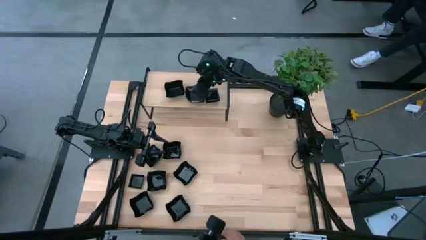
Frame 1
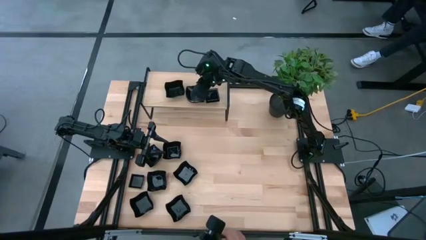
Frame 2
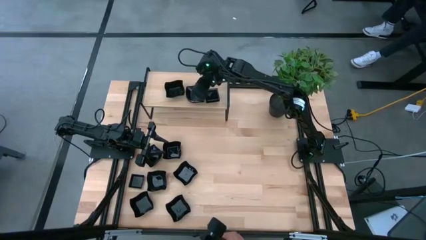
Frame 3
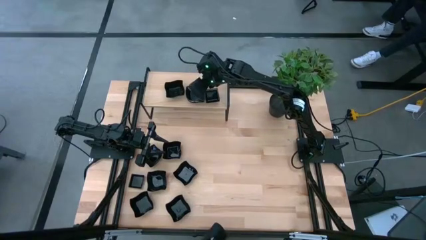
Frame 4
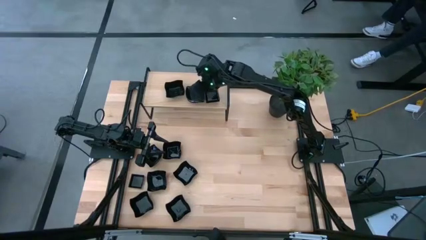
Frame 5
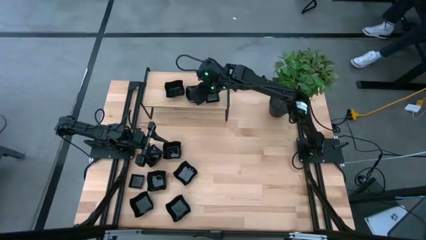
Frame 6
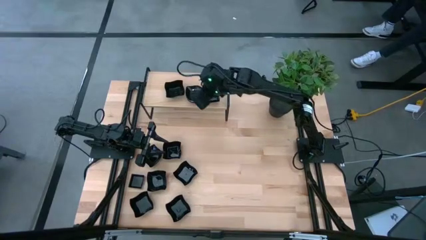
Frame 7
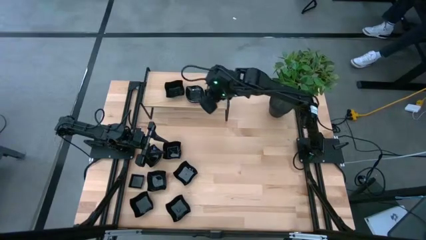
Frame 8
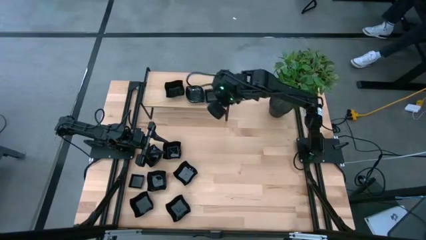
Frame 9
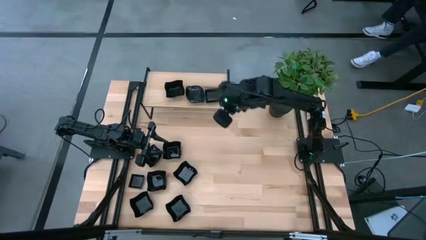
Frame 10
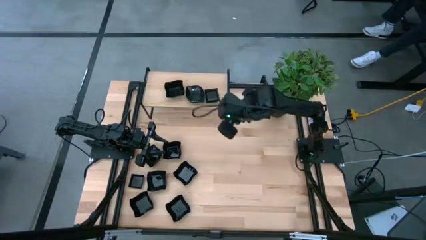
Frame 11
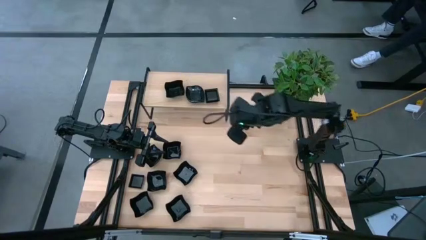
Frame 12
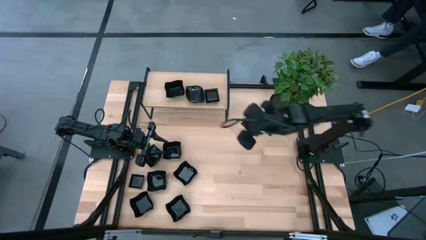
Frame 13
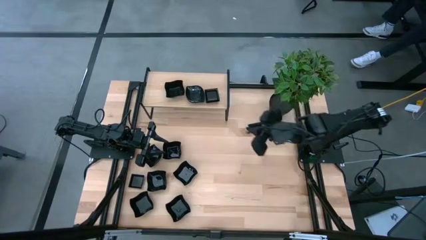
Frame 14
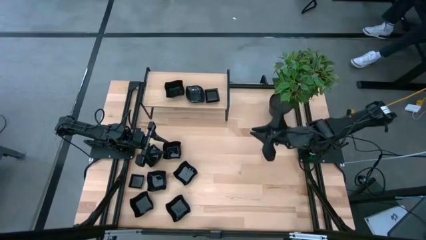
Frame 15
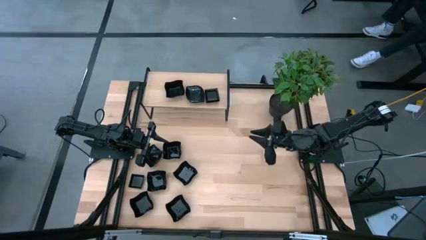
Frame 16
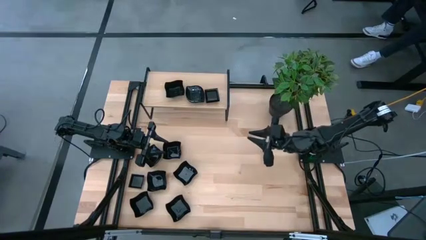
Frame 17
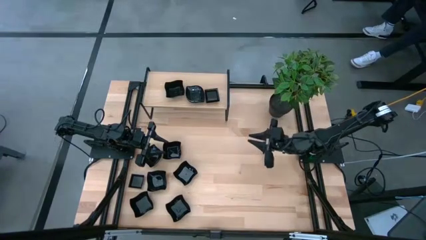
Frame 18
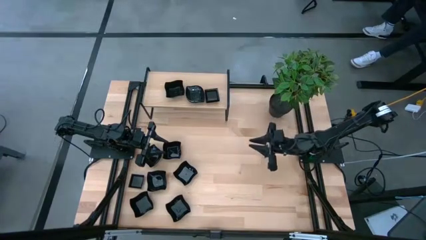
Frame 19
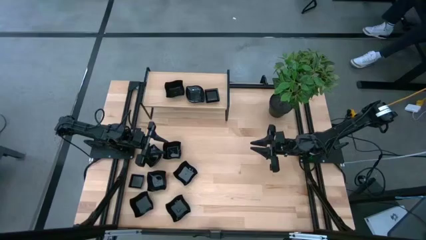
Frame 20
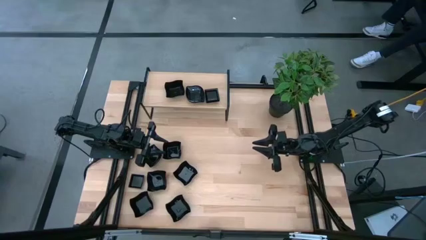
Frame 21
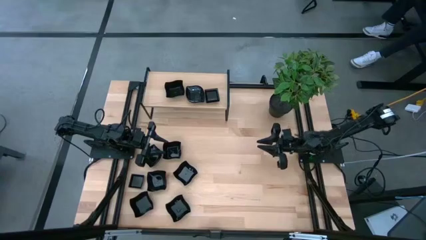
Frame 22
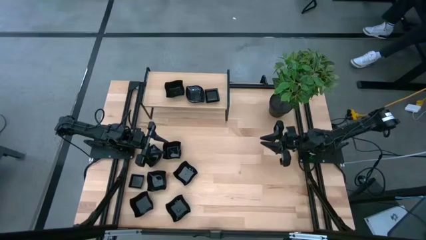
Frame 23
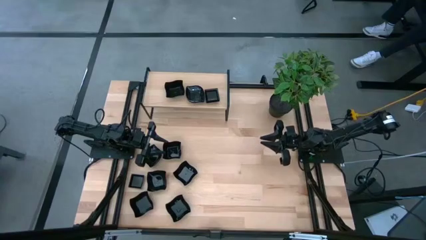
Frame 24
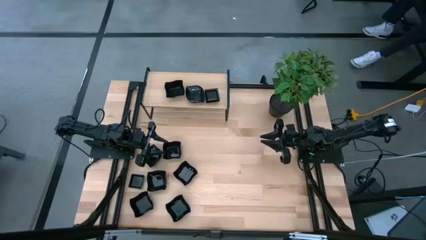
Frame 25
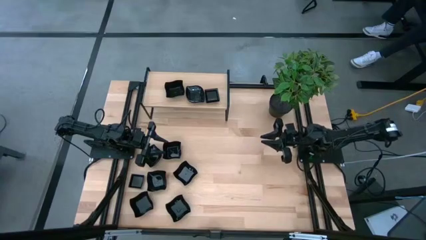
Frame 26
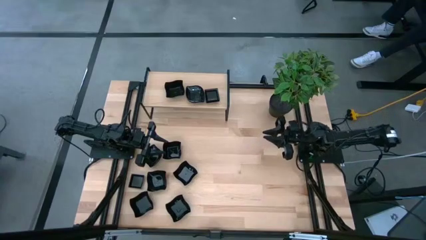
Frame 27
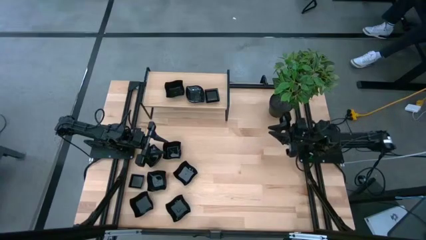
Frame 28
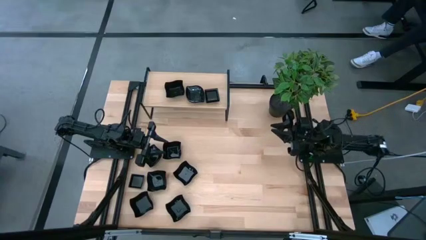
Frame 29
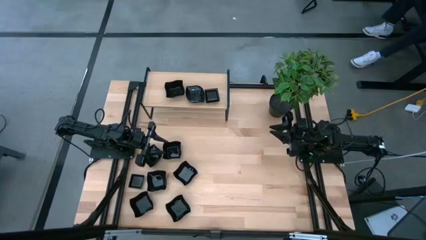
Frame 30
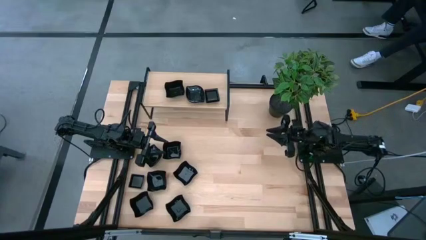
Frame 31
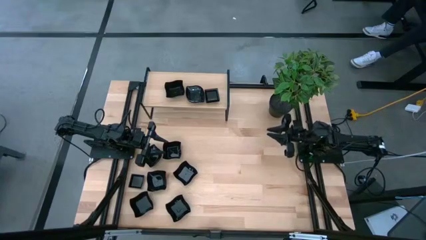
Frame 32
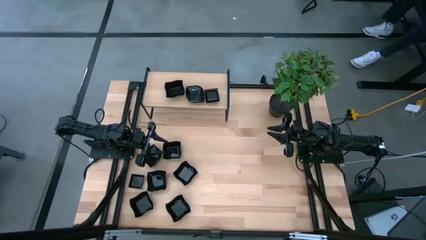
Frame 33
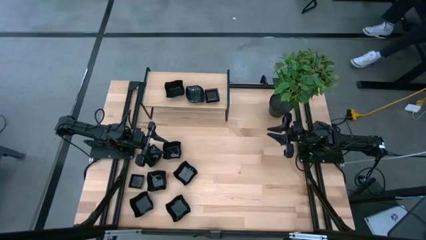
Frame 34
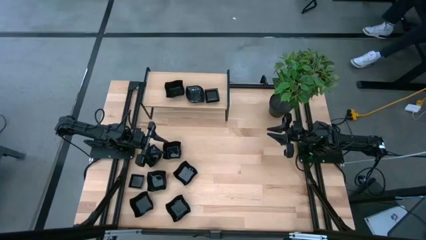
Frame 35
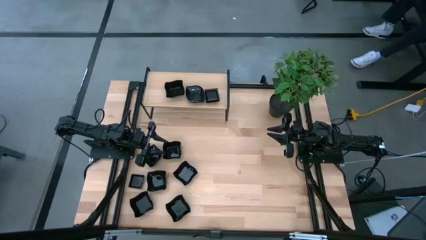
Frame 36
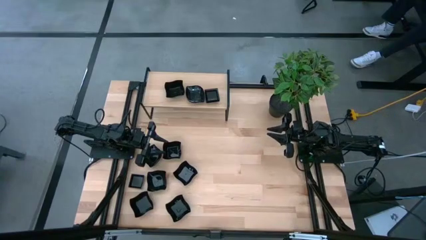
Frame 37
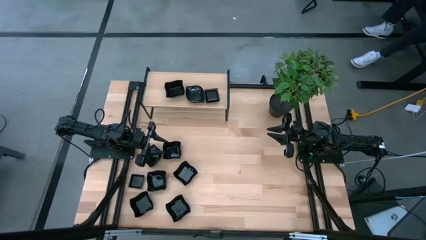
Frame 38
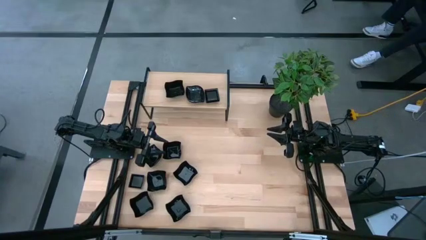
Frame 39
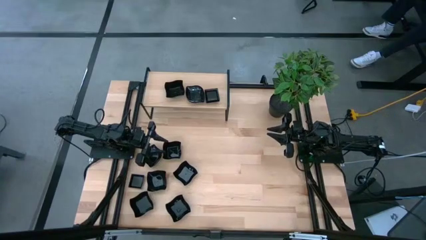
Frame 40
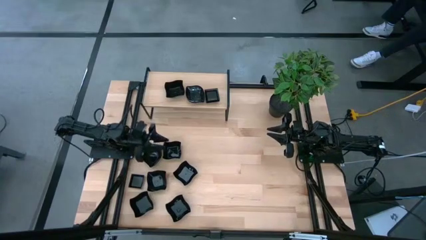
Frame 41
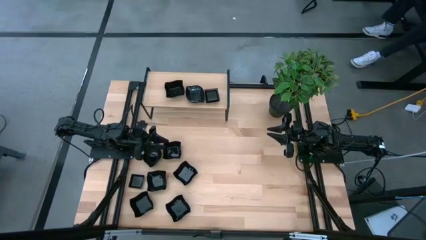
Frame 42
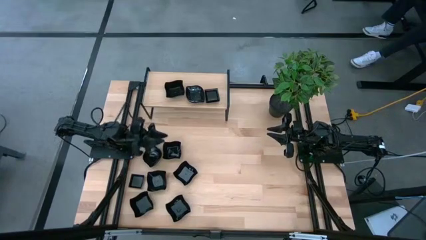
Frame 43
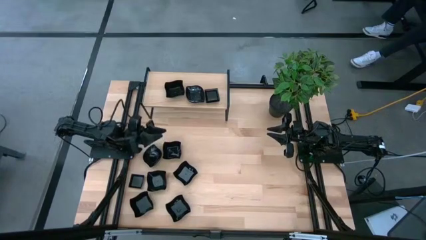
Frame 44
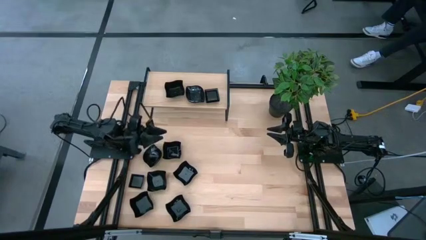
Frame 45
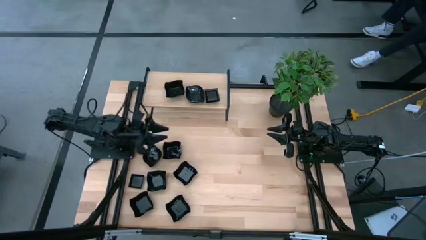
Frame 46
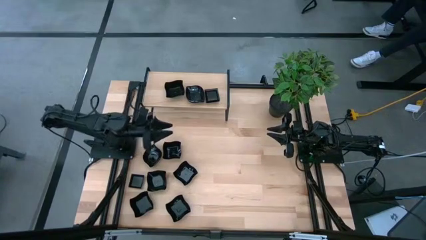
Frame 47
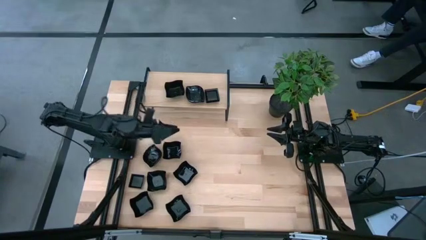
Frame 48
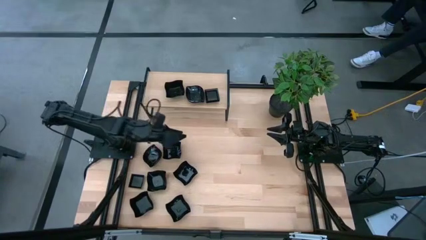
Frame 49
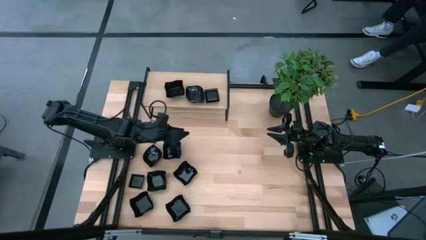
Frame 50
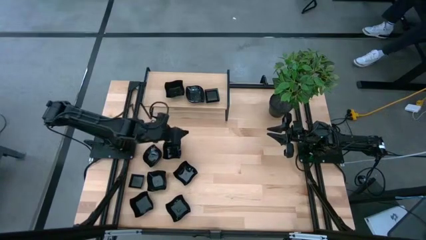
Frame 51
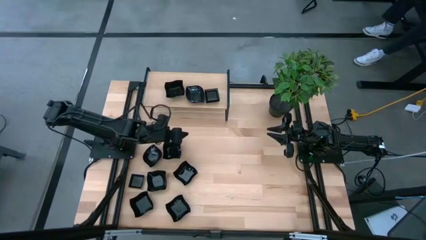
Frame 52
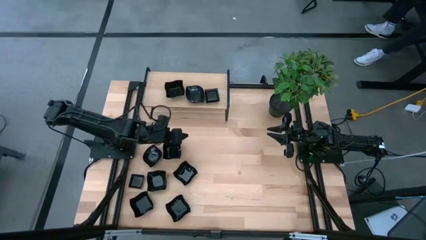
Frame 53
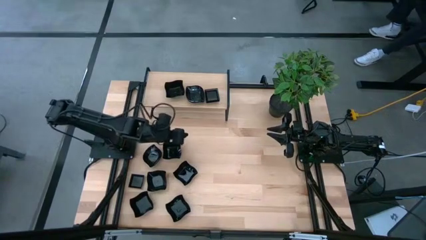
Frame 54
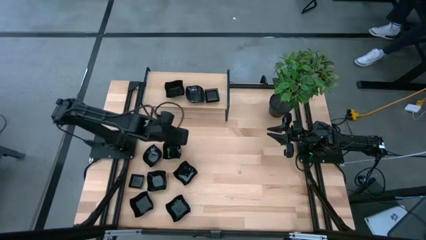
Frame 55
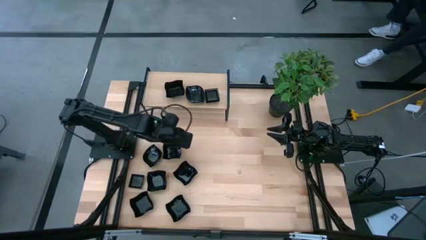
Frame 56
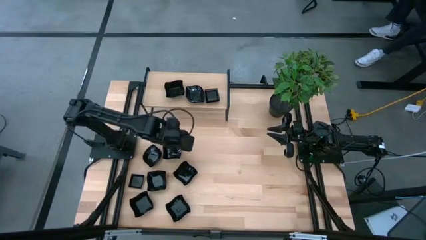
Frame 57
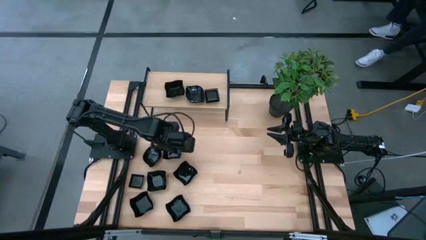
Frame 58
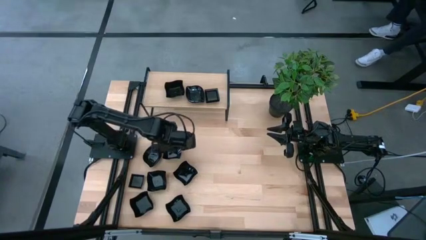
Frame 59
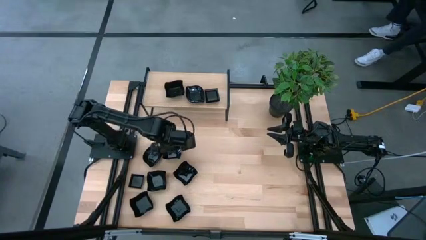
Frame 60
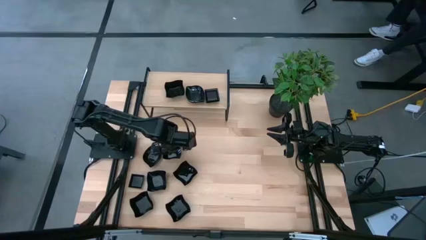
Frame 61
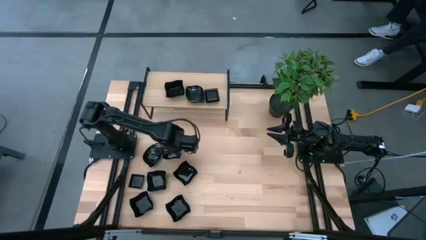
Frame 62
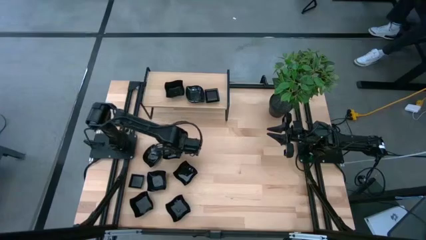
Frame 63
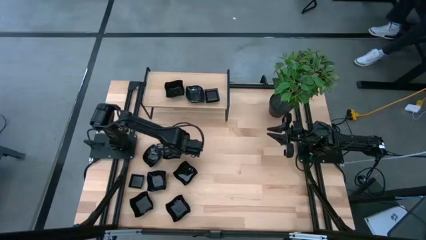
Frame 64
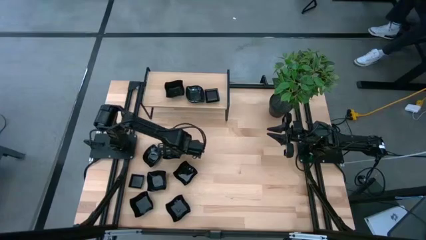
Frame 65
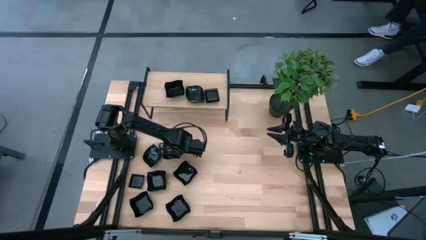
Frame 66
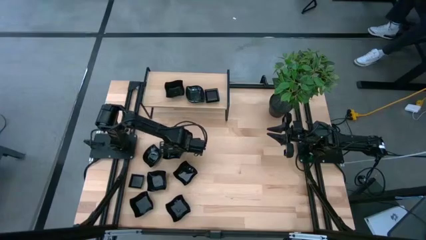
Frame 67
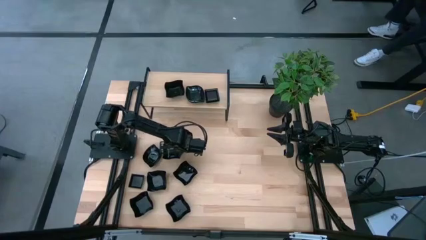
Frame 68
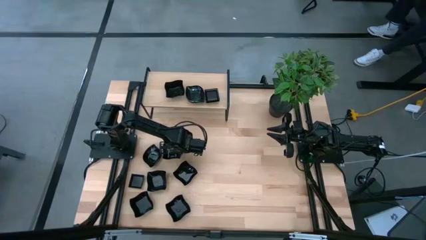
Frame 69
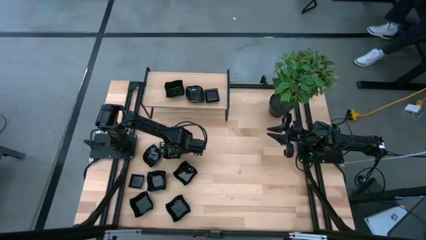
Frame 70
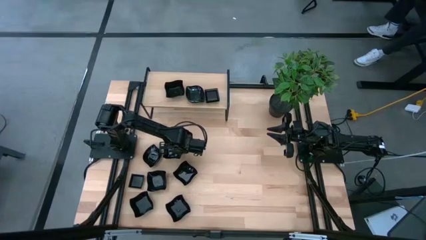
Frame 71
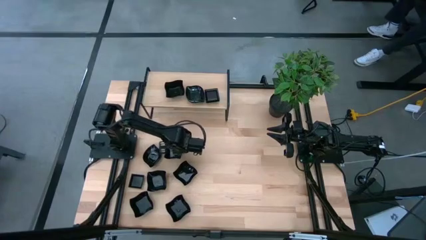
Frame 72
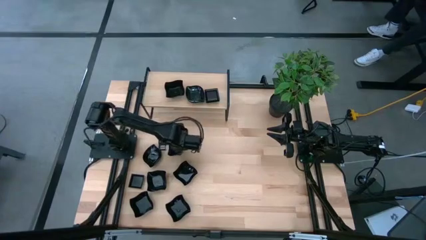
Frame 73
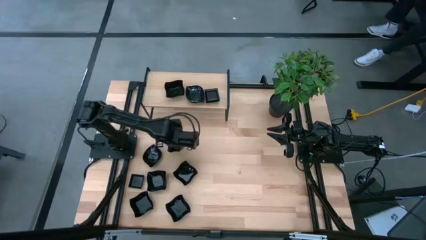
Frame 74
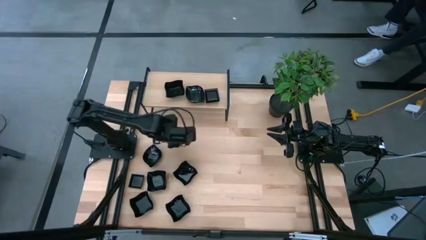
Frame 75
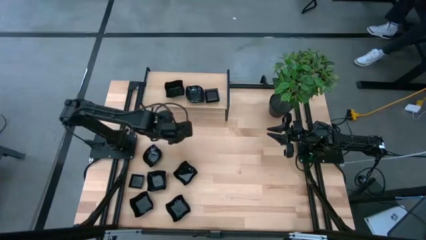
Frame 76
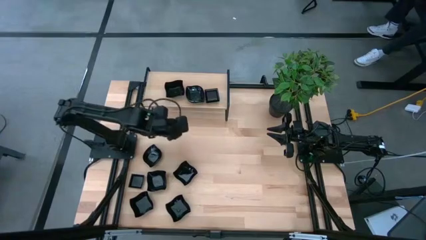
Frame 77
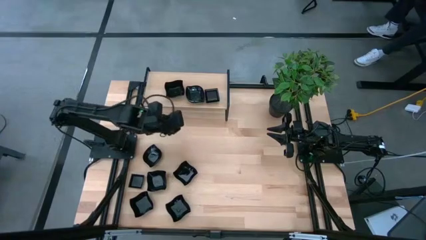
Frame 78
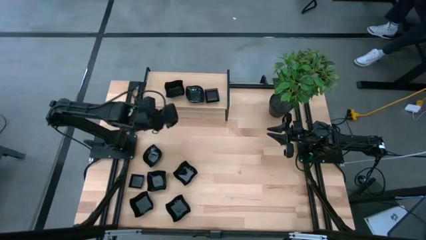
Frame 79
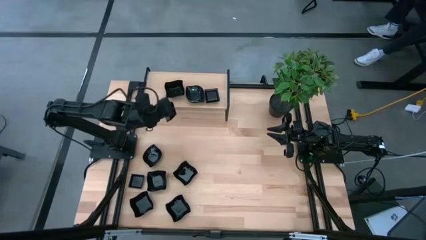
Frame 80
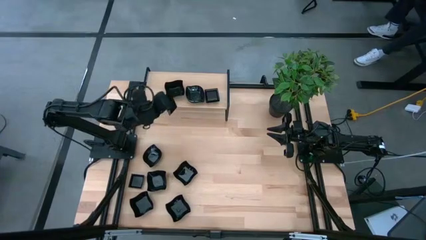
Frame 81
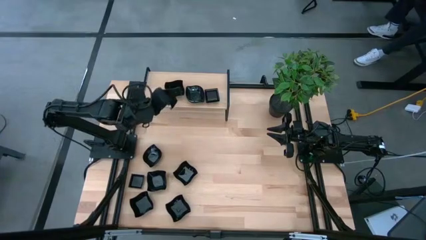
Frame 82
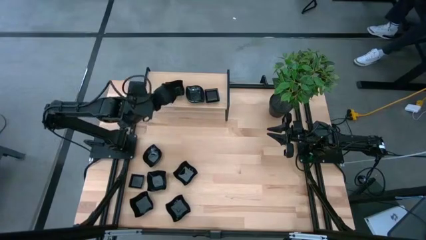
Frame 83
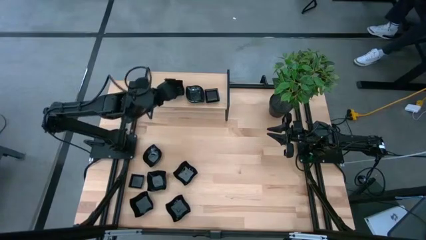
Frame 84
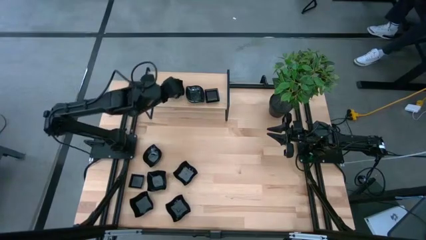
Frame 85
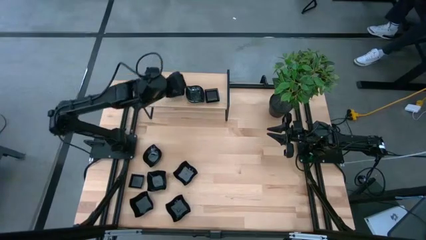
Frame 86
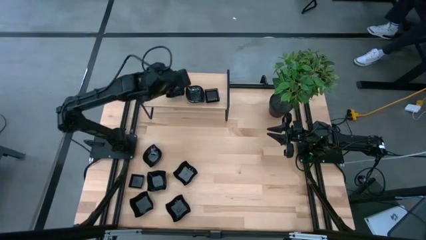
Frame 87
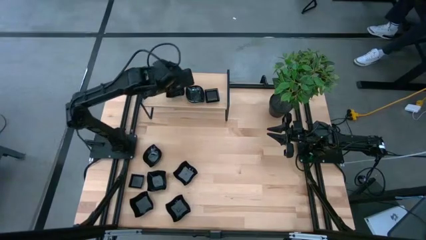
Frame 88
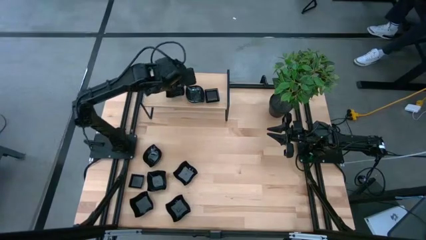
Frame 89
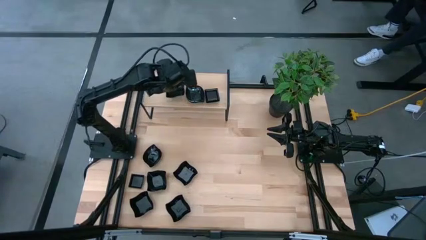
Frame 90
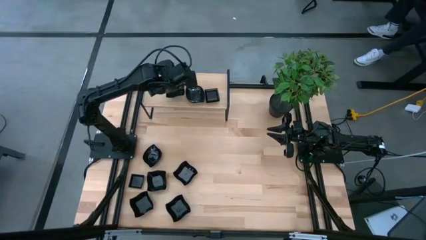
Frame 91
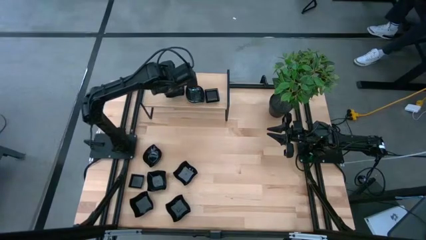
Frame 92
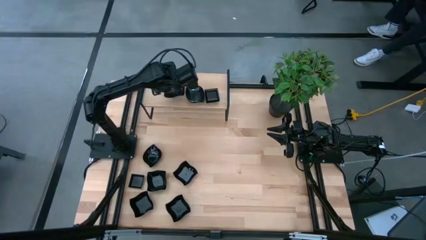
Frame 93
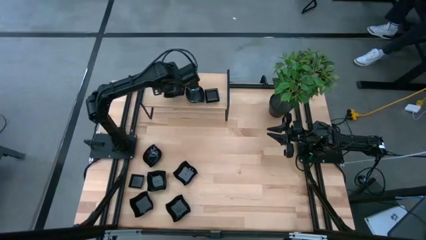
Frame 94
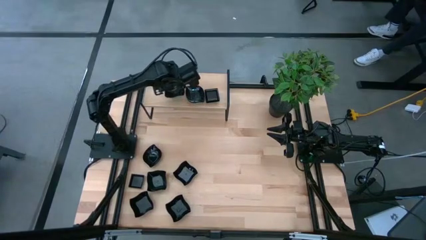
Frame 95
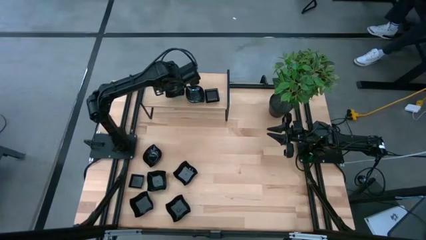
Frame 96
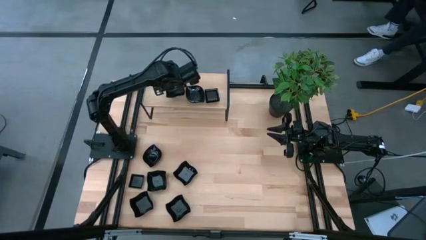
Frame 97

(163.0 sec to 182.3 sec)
Task: Pick & Place Mini shaped plates
Stack the distorted square plate on top of the distorted square plates on the shelf
